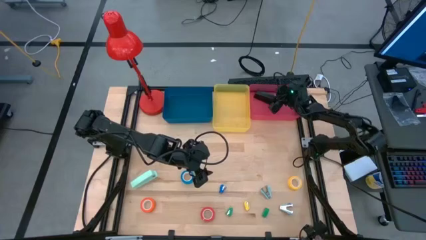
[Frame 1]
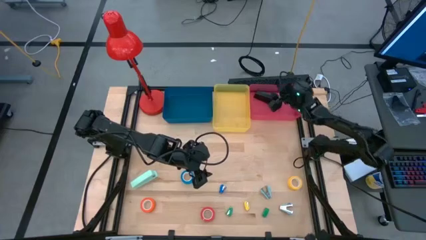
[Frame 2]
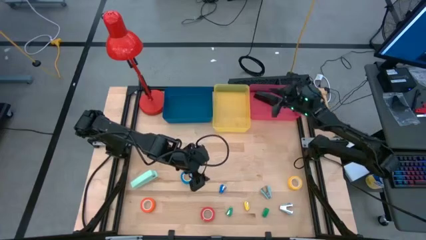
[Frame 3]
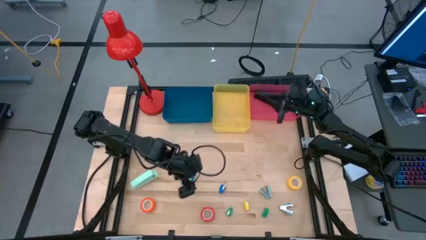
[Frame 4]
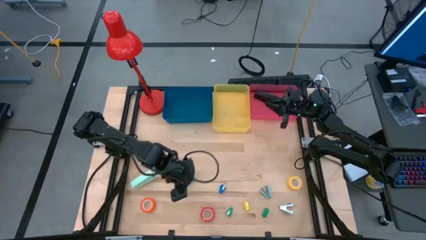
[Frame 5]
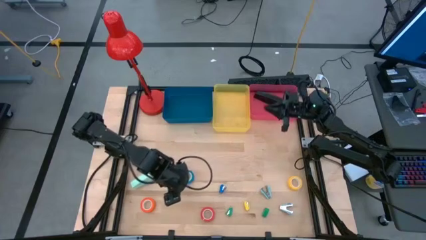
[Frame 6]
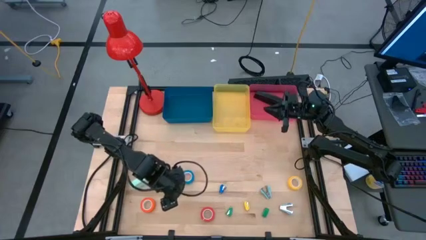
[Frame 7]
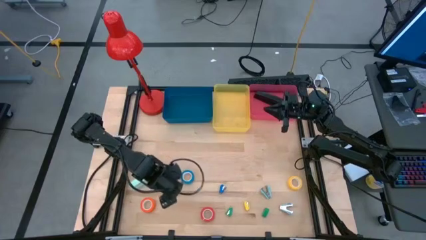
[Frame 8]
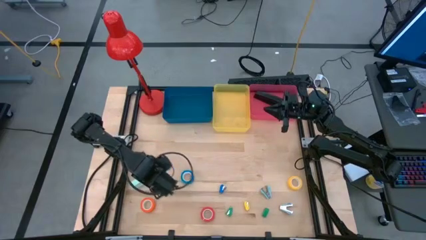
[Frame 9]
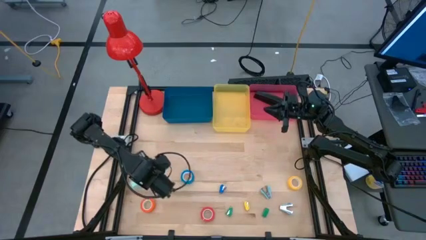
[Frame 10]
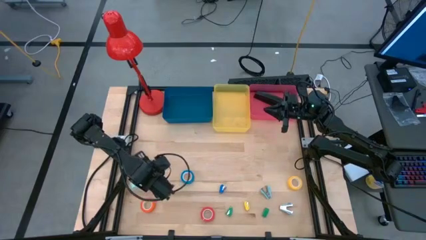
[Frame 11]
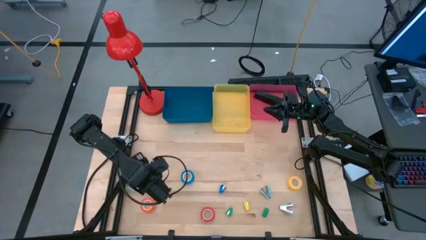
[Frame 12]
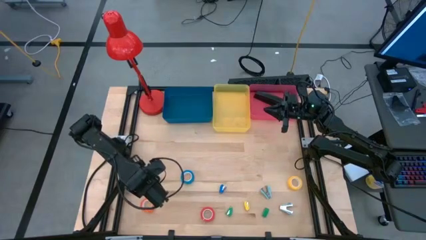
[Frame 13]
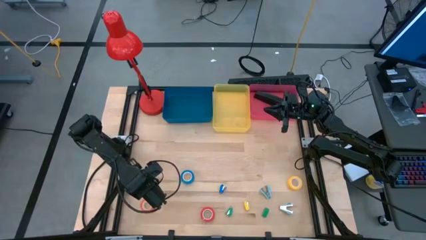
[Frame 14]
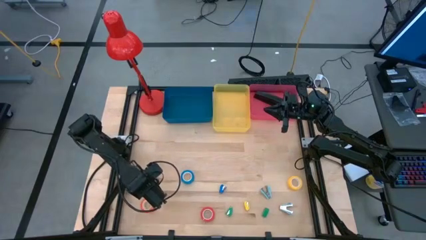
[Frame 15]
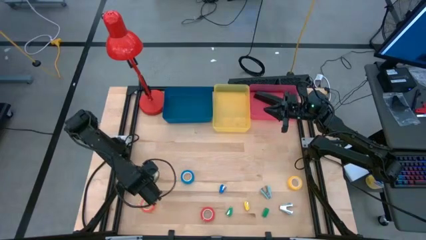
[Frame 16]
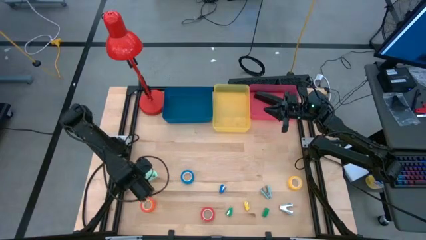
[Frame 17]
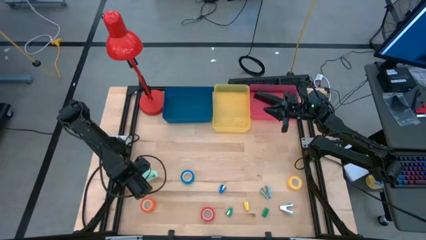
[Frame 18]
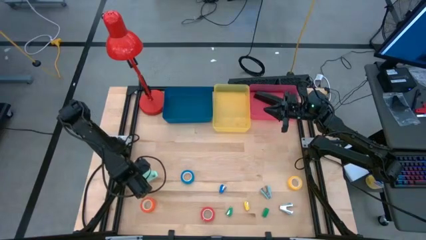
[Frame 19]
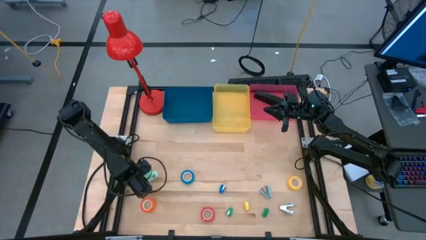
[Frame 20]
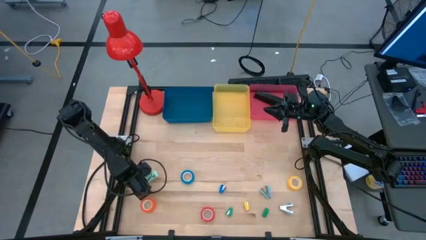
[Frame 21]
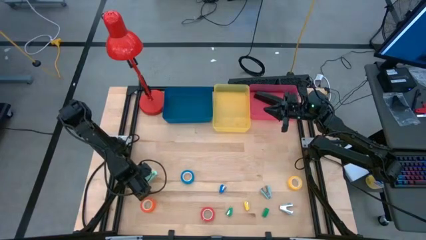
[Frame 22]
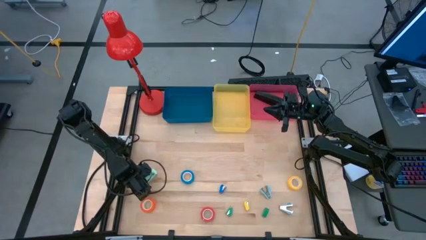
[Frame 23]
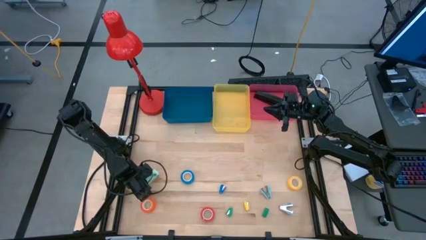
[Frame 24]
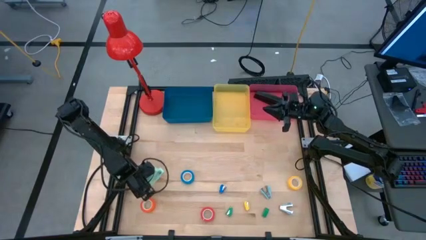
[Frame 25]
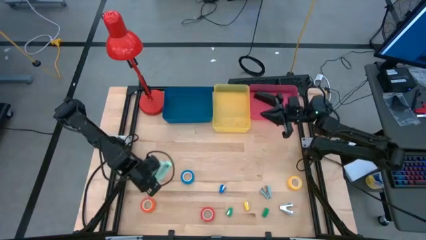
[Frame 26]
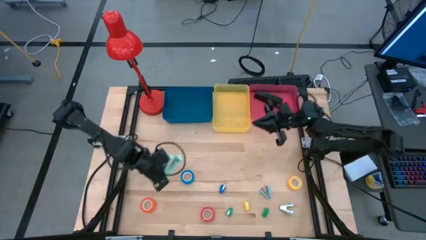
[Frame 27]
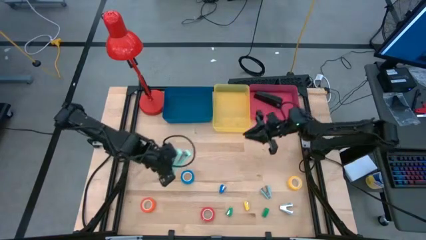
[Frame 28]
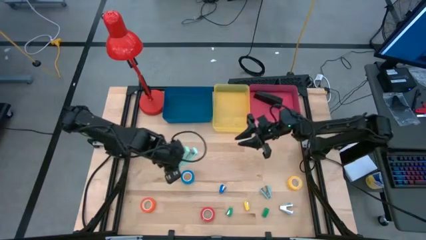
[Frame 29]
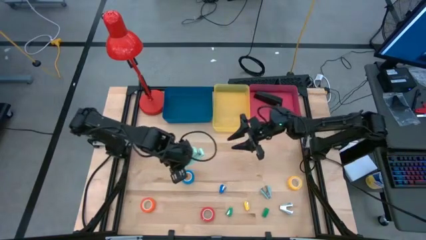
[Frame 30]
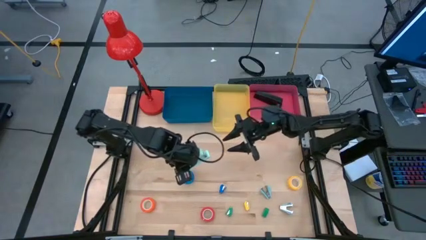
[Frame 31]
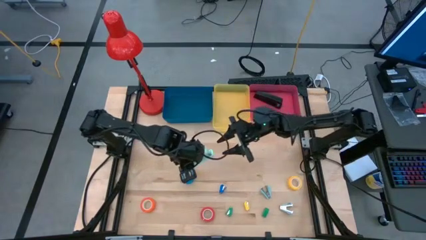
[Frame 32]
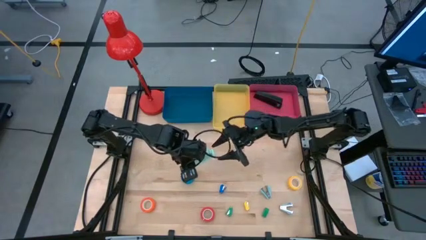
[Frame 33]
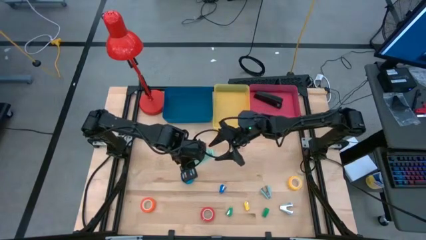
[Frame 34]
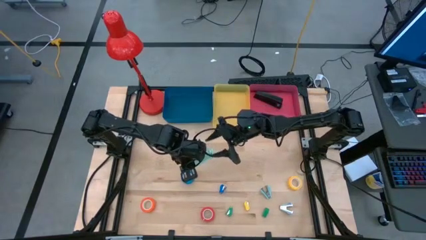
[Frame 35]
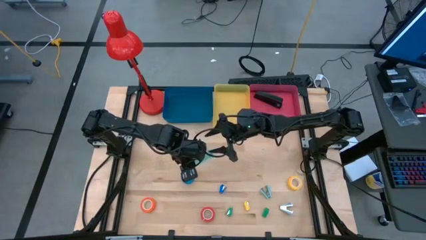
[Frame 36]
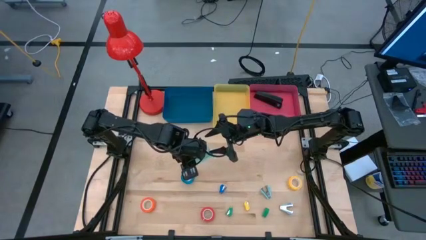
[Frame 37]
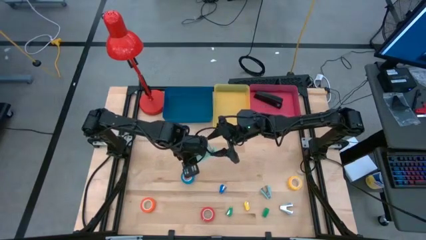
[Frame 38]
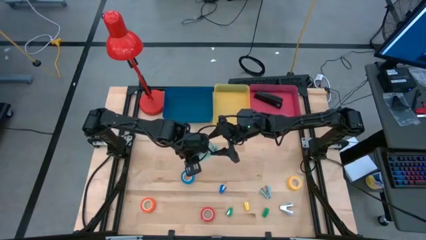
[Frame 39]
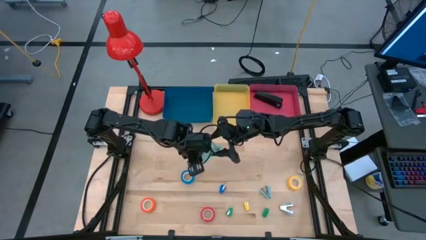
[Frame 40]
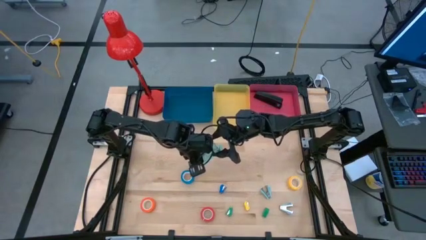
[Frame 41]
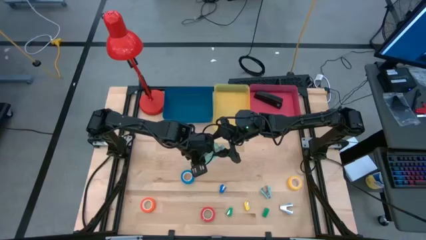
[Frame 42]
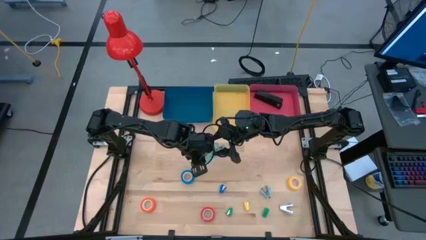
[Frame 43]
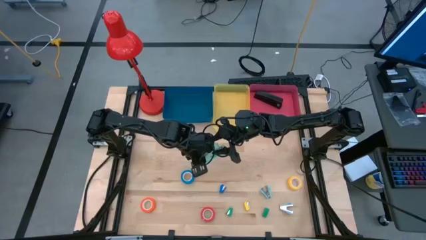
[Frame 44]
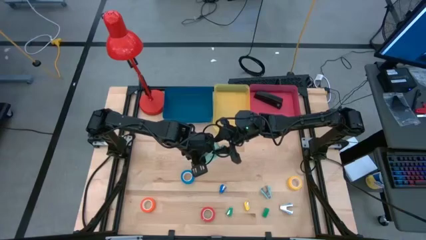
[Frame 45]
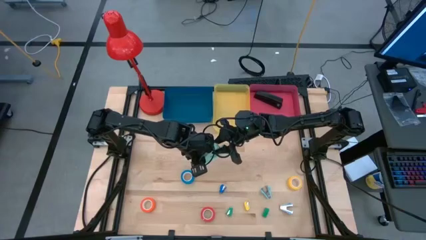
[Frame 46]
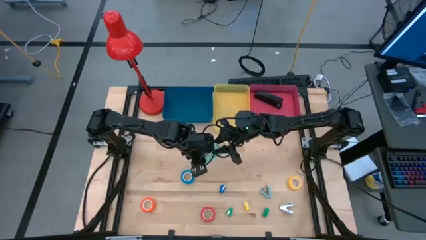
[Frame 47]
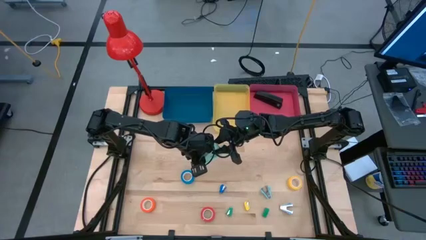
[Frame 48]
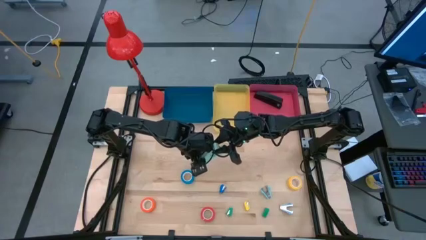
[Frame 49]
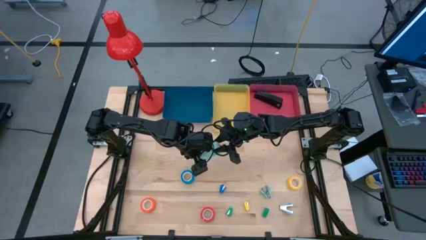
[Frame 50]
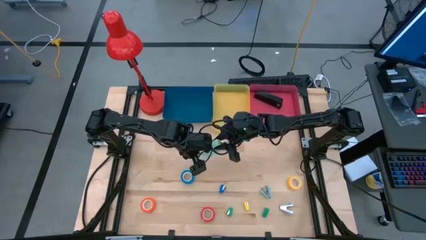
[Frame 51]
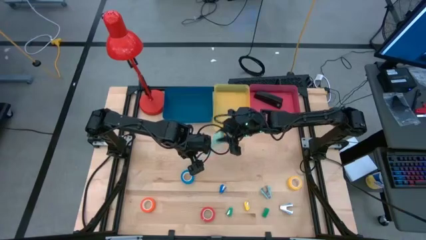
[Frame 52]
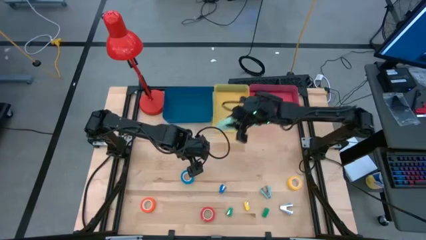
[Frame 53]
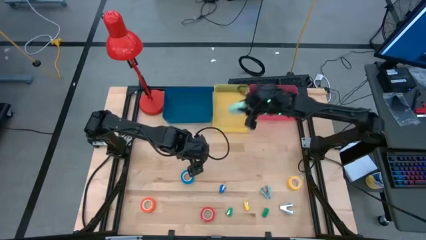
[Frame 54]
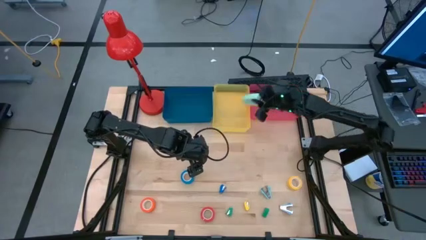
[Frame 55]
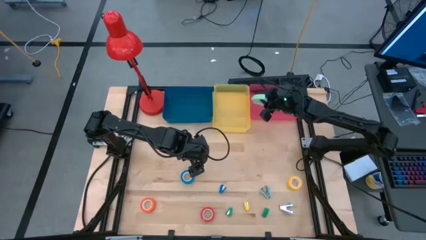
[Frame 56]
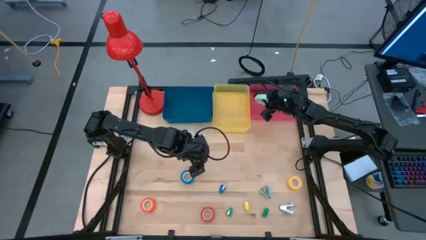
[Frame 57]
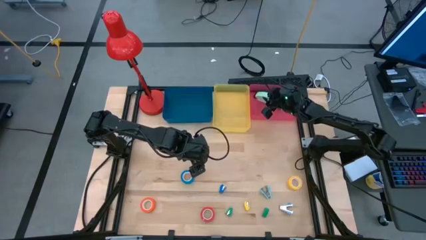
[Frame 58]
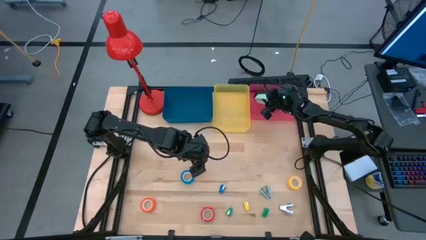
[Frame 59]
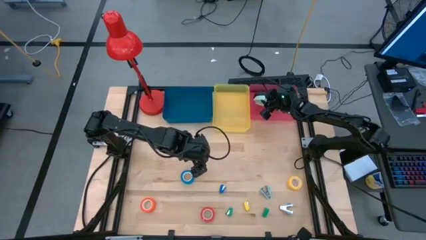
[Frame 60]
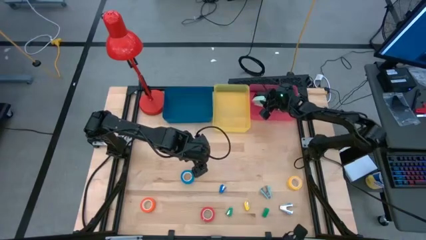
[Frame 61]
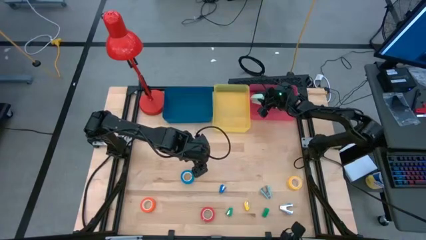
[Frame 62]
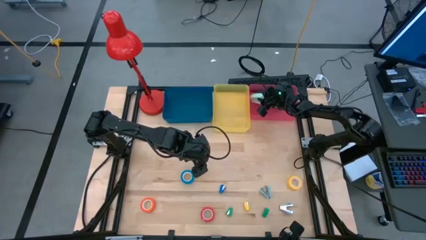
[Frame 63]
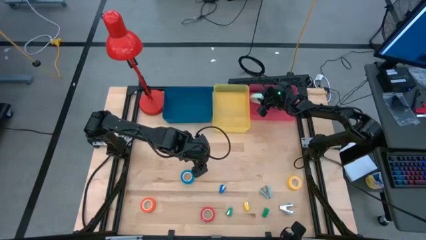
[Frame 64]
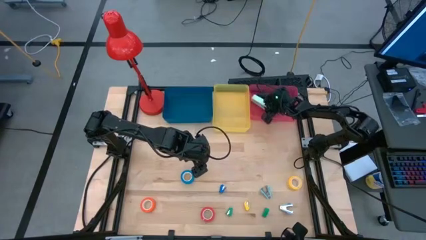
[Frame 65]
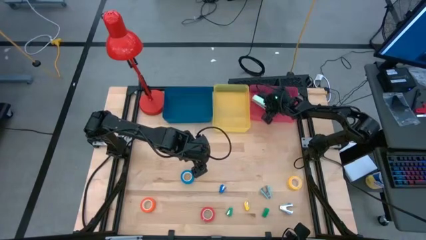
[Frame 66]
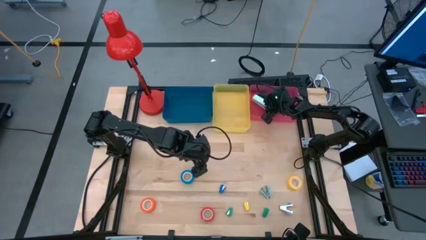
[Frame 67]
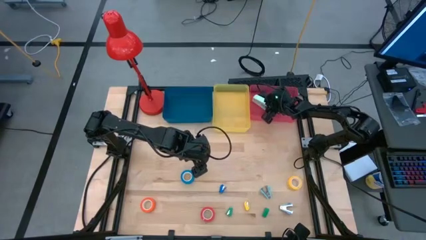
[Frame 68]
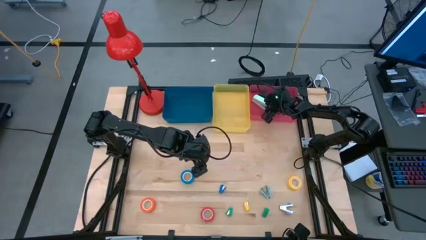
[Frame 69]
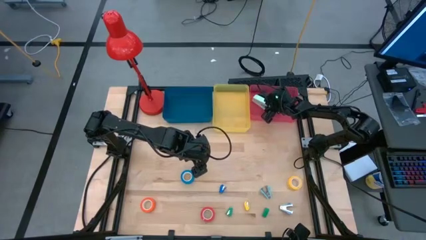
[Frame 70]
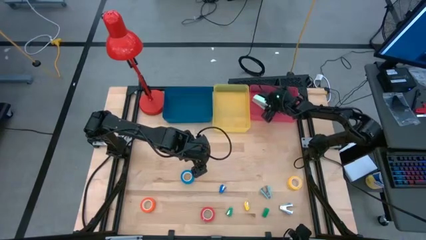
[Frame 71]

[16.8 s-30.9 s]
Task: Pick and place Stapler, Stapler remover, tape
Put the light green stapler into the pink bin
